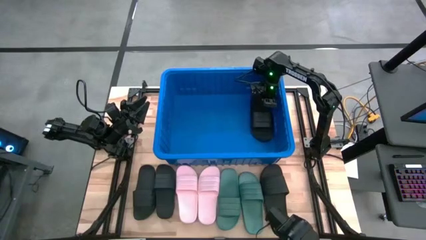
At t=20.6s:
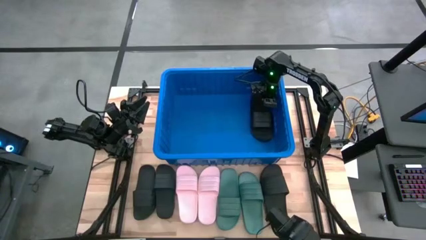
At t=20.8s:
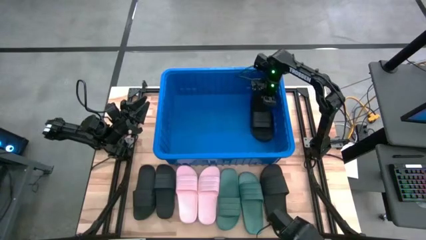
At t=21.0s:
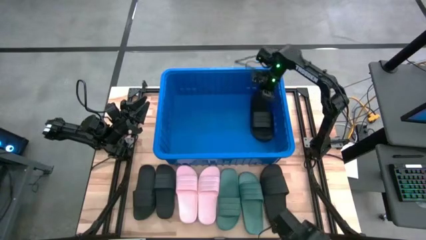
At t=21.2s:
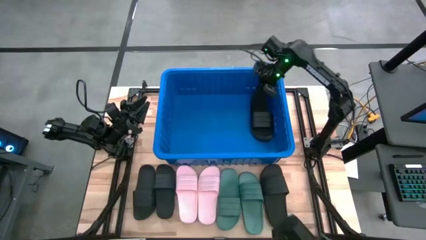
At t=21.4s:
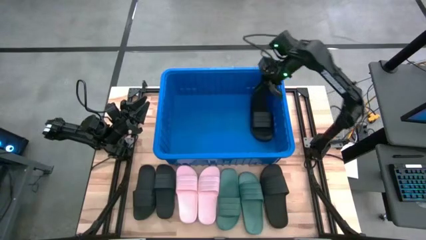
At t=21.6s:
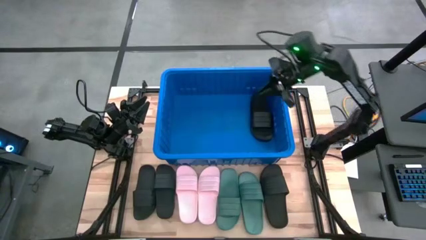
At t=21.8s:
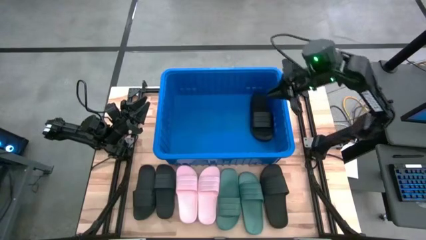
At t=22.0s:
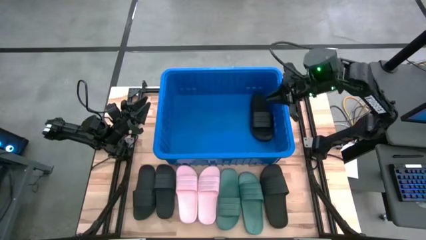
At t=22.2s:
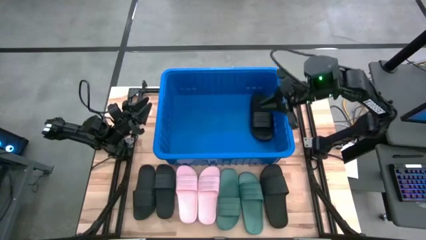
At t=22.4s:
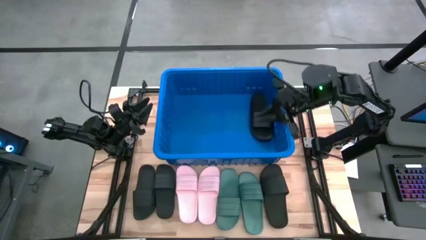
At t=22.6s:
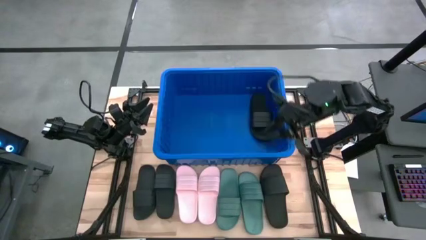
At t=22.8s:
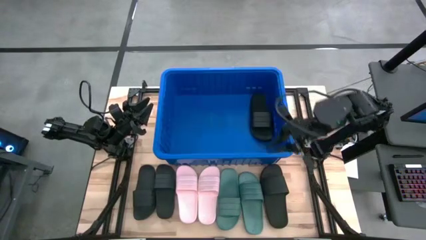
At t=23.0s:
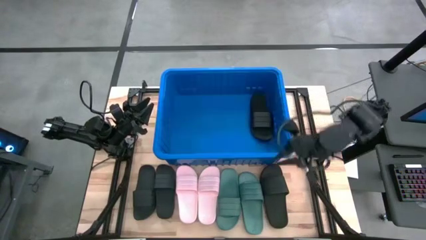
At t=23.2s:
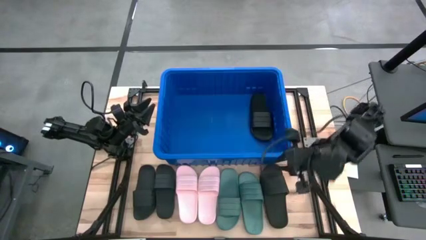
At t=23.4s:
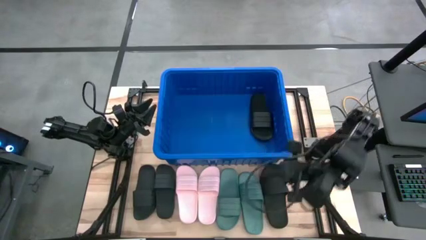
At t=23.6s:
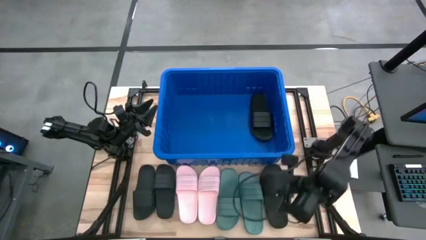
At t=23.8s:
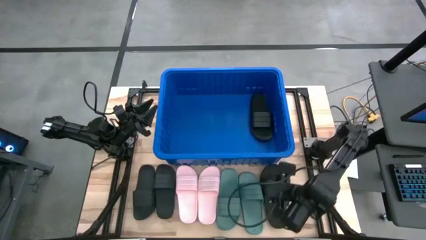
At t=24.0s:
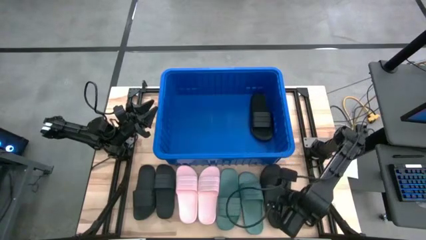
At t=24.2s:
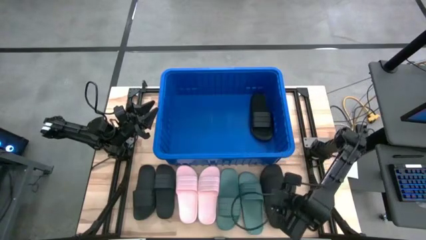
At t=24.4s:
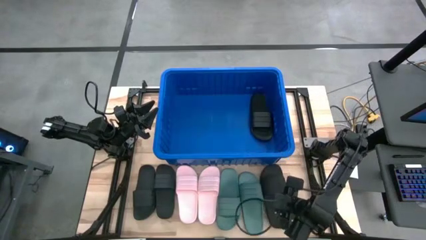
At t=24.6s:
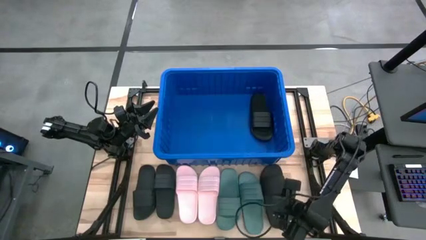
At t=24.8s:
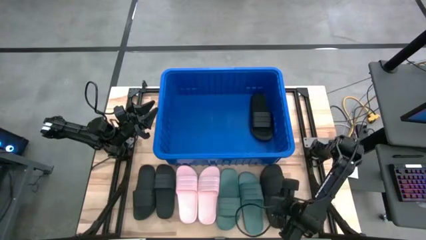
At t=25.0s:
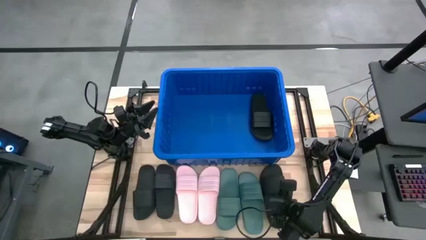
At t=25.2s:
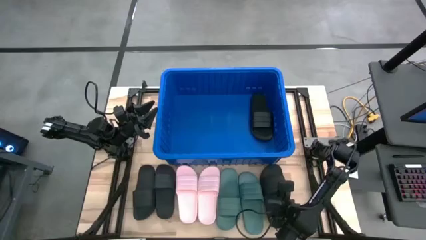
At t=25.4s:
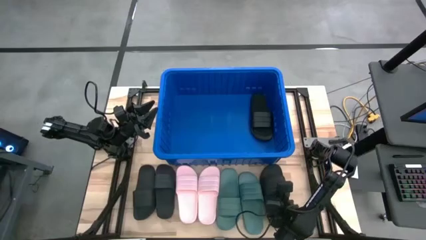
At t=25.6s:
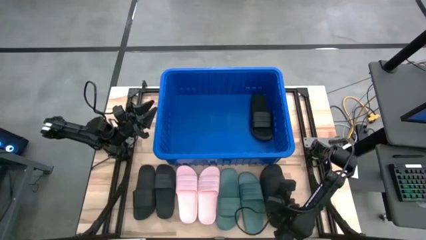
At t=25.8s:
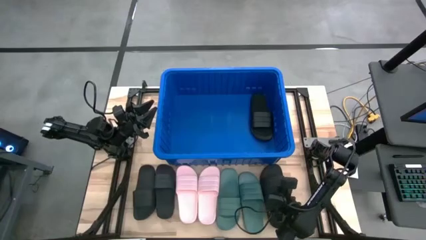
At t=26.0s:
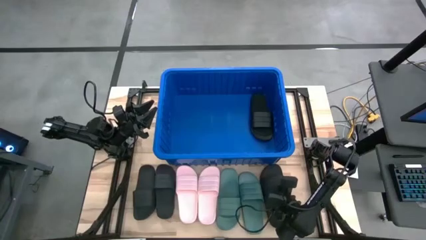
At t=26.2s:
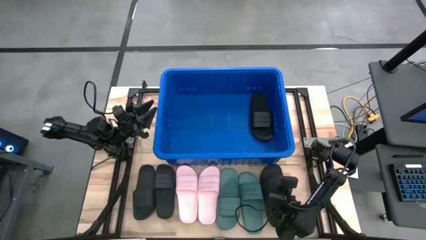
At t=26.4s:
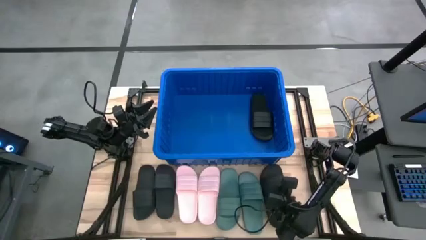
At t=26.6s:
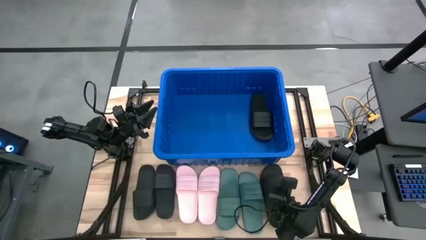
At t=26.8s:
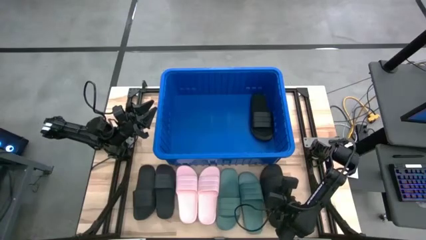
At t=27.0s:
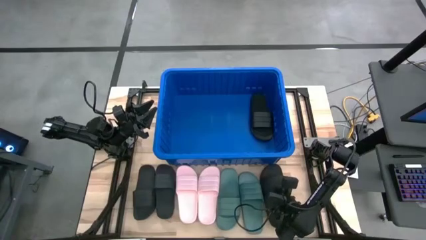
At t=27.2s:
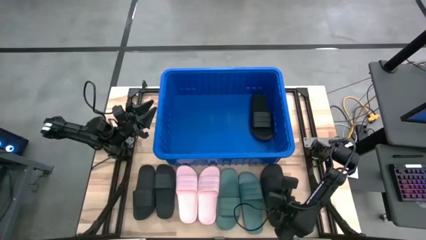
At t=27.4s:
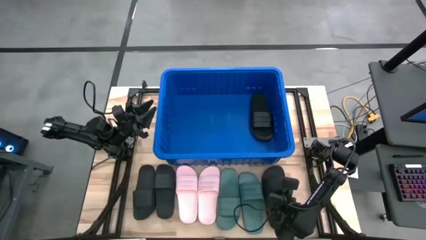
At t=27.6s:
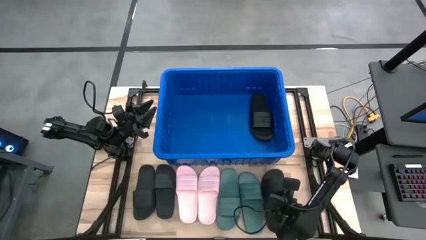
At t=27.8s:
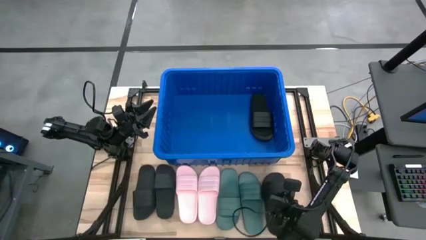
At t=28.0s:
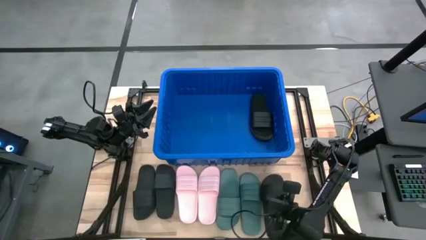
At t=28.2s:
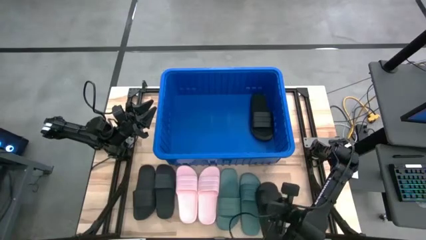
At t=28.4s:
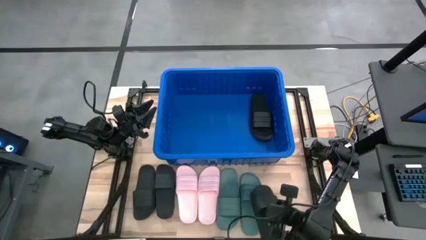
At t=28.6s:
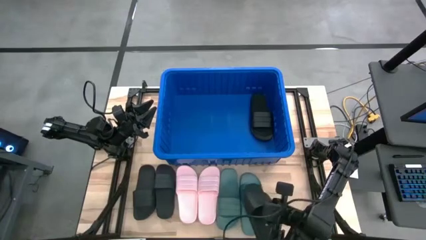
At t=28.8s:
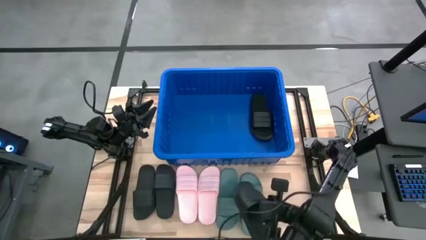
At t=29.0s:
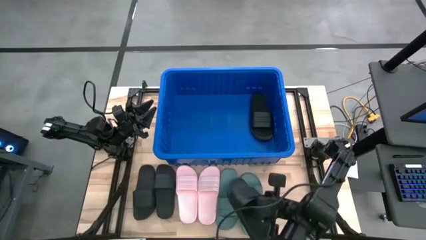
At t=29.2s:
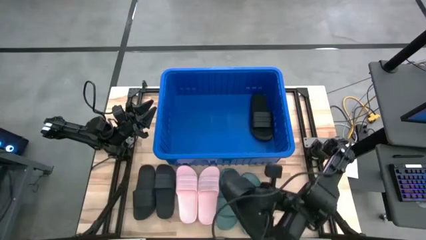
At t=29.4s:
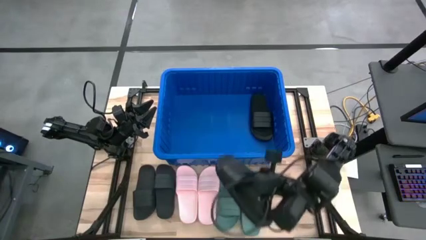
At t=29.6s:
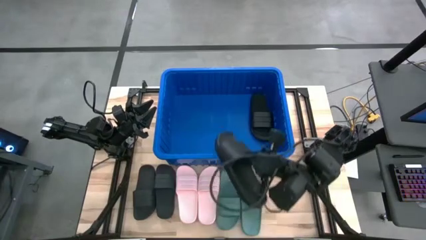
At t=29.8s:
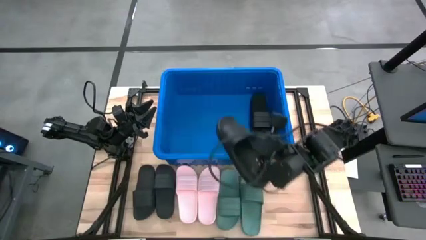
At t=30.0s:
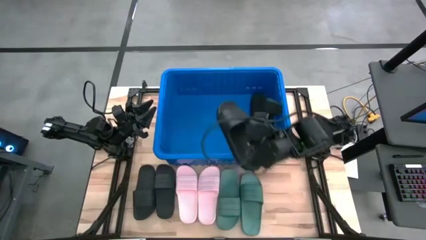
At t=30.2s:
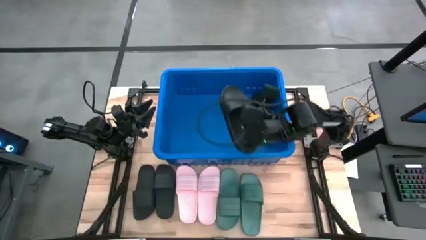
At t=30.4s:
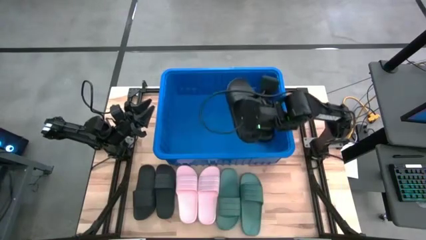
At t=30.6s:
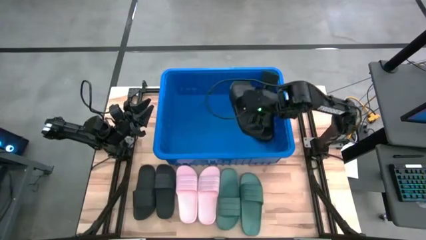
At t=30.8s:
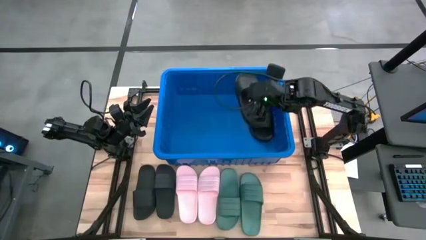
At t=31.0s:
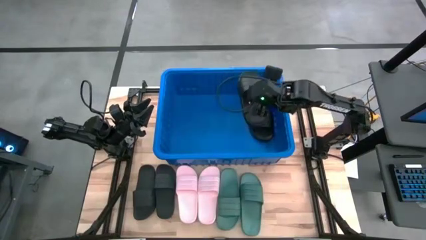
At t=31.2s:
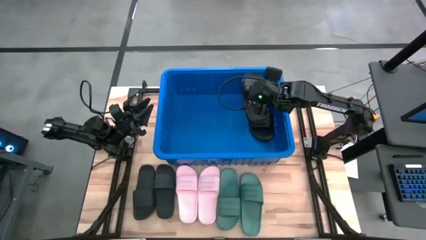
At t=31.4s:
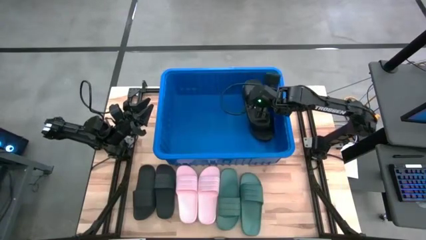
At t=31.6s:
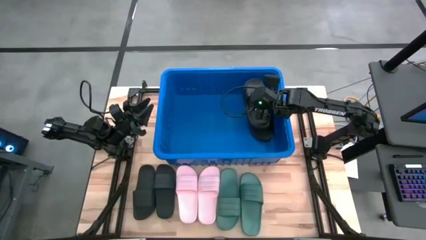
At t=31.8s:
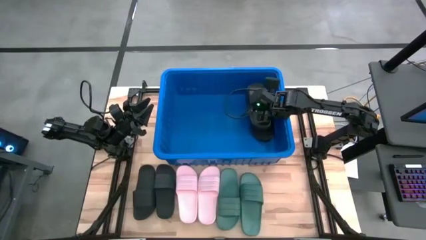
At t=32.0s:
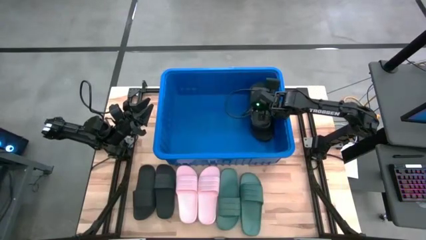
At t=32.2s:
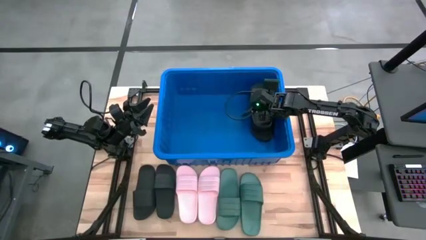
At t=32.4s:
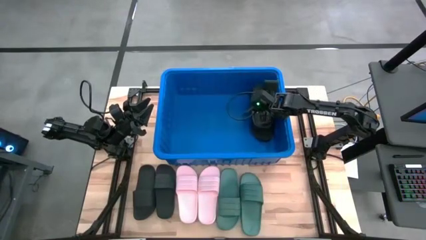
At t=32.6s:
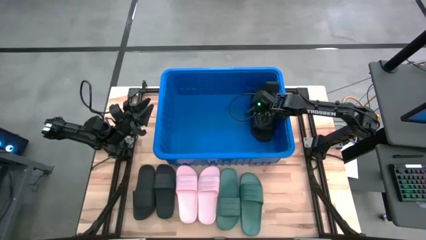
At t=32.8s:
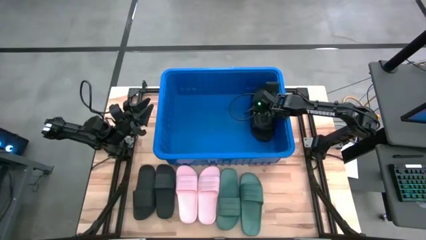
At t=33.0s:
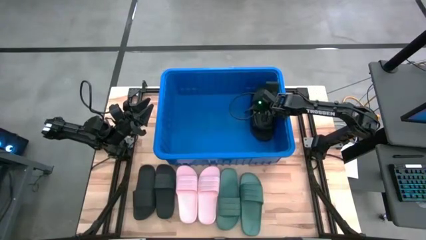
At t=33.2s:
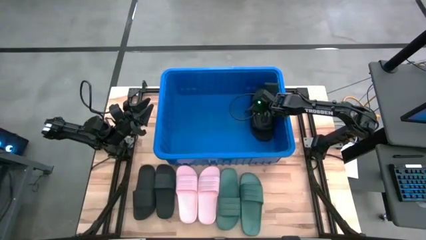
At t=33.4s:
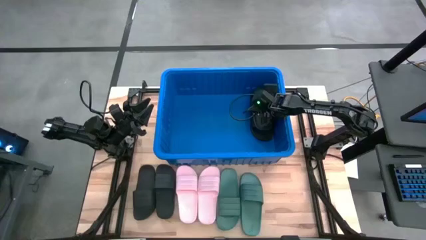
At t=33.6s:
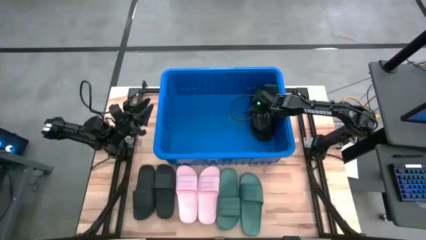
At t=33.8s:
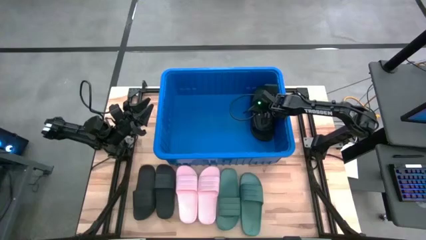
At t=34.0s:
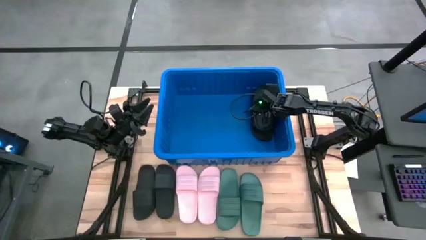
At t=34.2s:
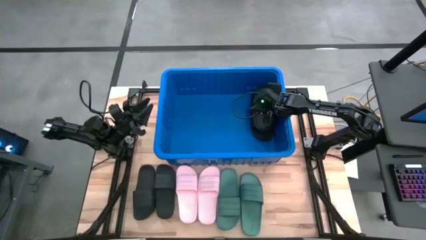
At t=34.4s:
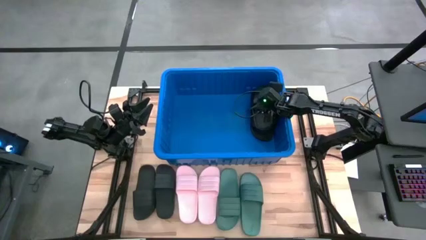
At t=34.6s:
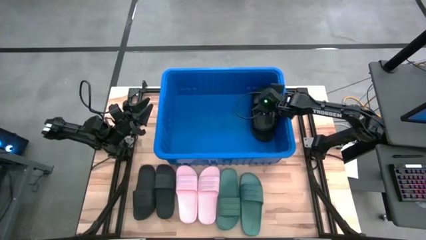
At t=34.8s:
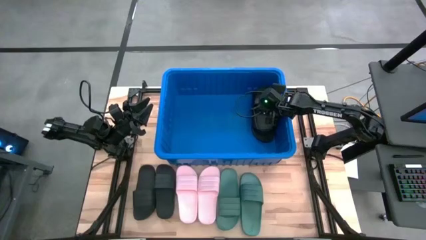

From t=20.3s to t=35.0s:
Task: Pick and place slides into bin
Put the black slide into the bin
